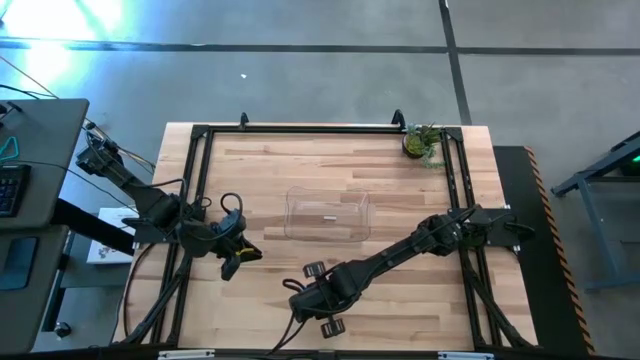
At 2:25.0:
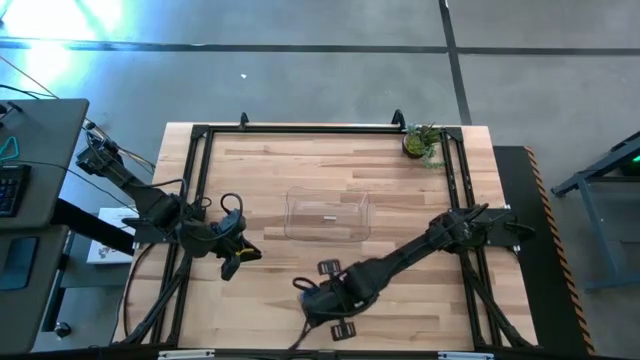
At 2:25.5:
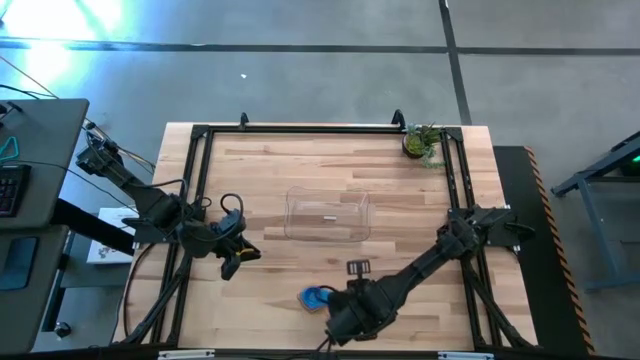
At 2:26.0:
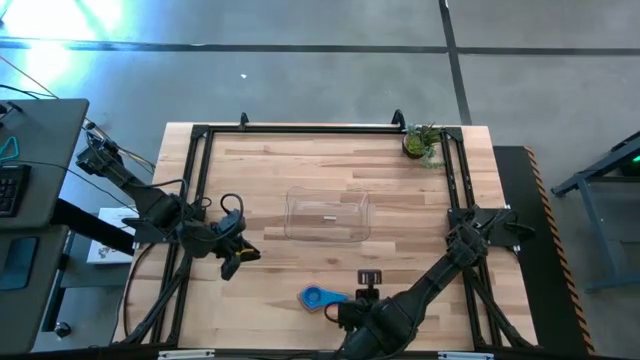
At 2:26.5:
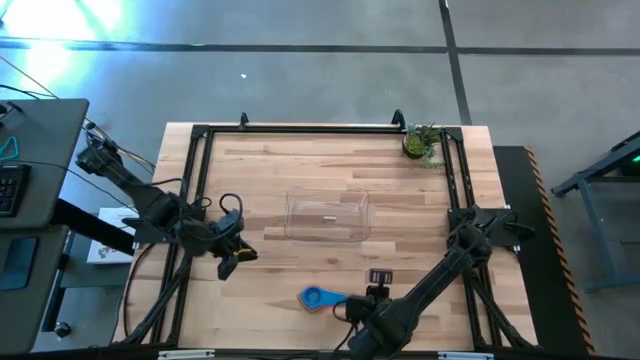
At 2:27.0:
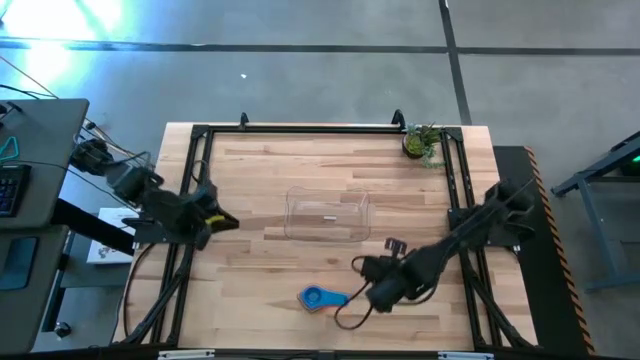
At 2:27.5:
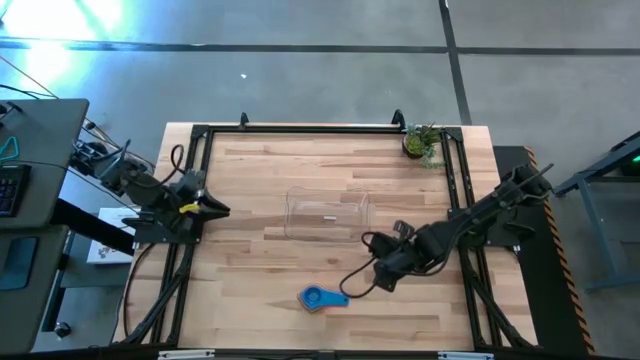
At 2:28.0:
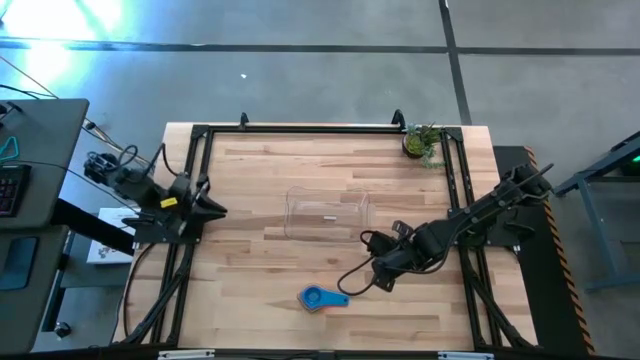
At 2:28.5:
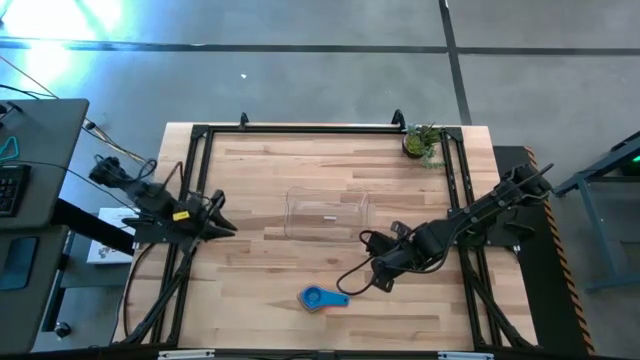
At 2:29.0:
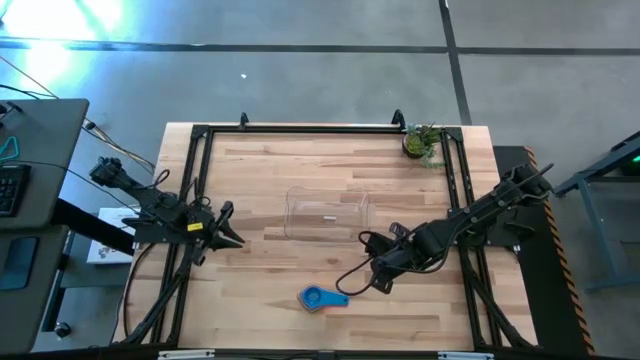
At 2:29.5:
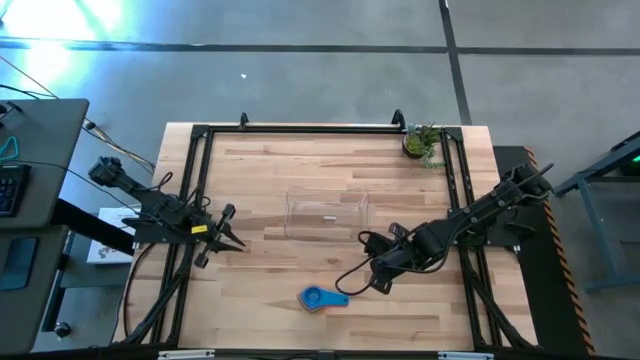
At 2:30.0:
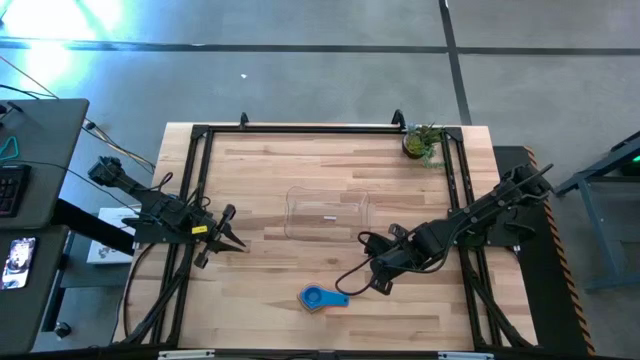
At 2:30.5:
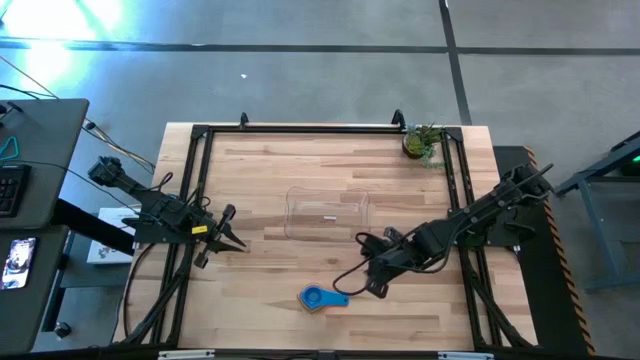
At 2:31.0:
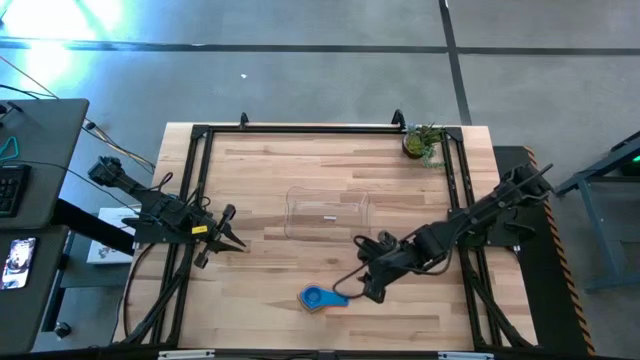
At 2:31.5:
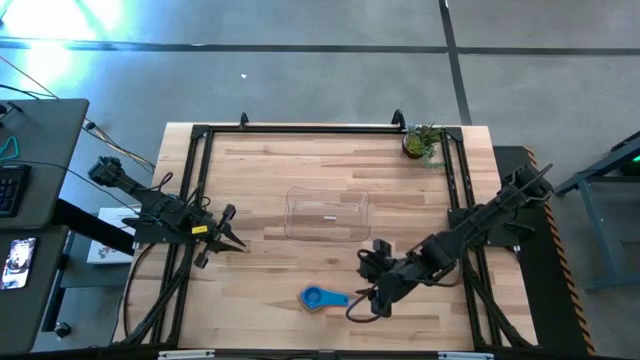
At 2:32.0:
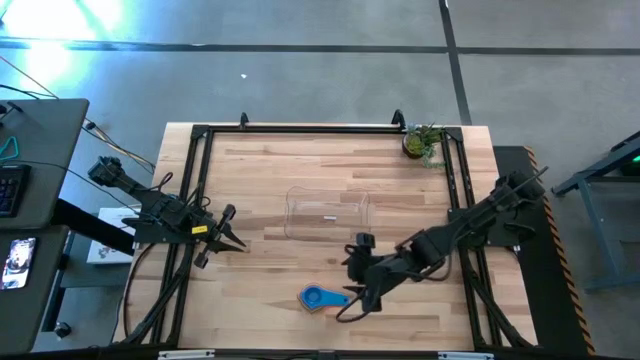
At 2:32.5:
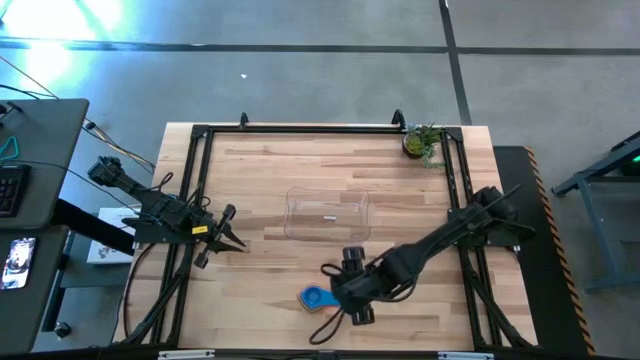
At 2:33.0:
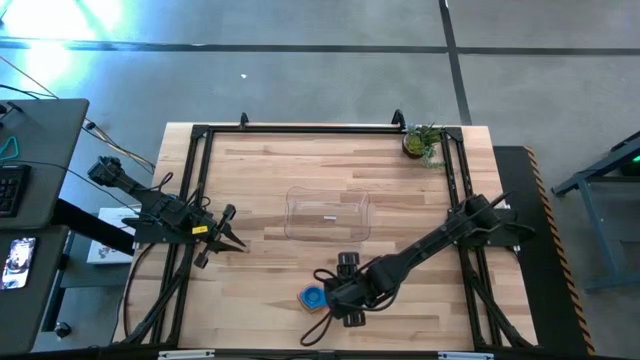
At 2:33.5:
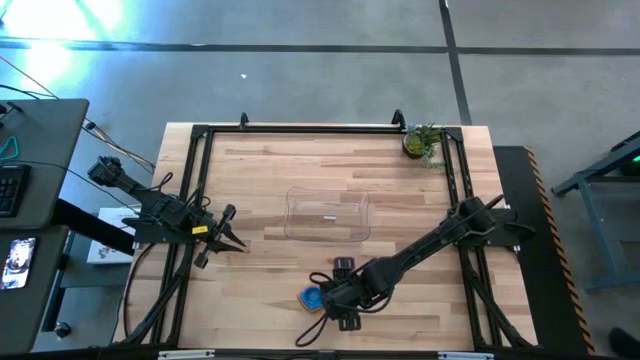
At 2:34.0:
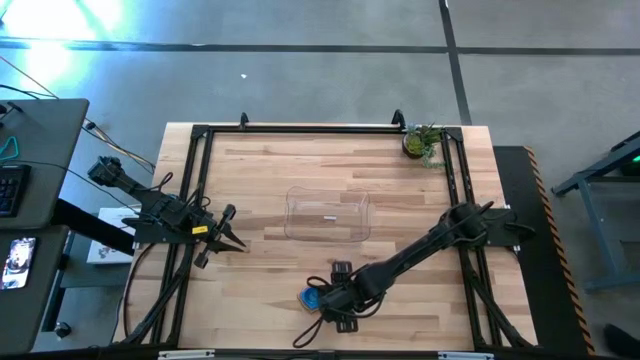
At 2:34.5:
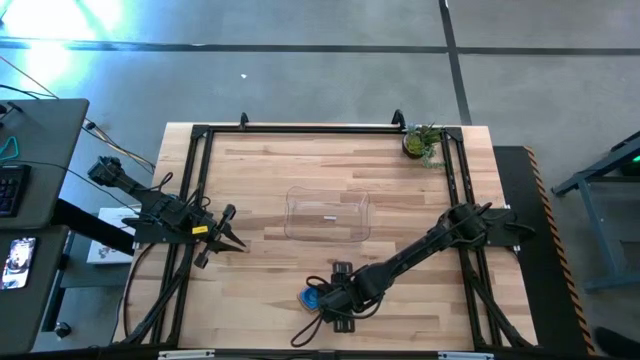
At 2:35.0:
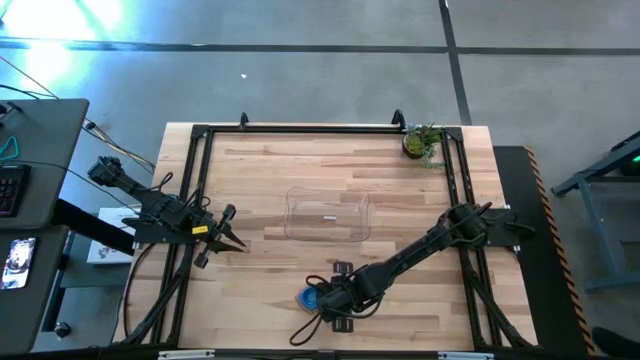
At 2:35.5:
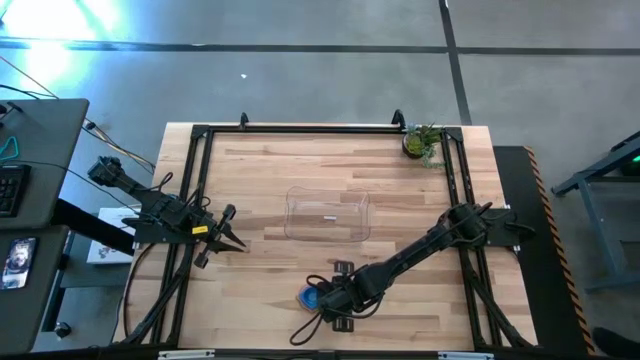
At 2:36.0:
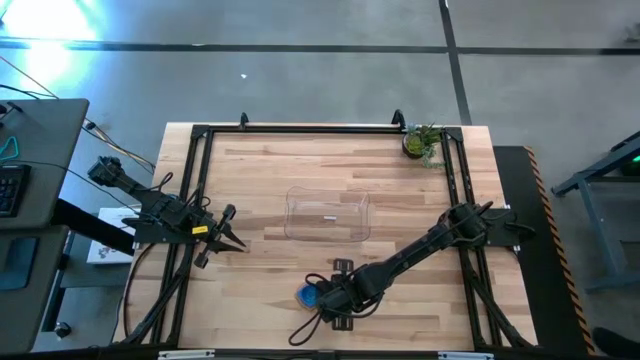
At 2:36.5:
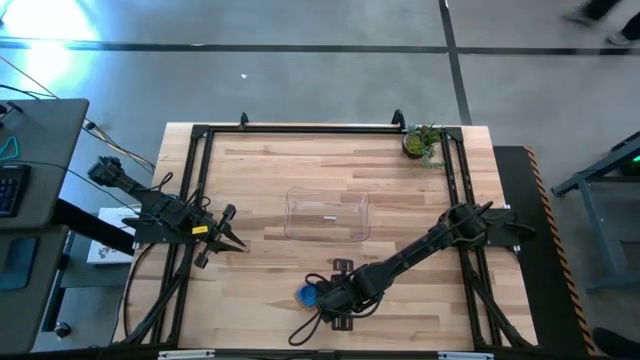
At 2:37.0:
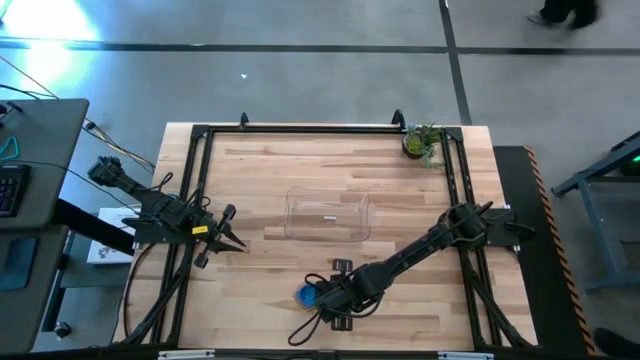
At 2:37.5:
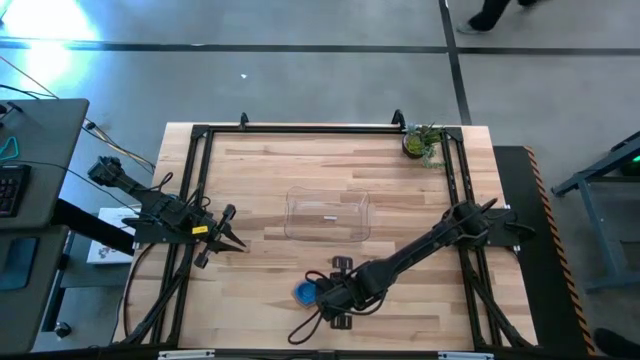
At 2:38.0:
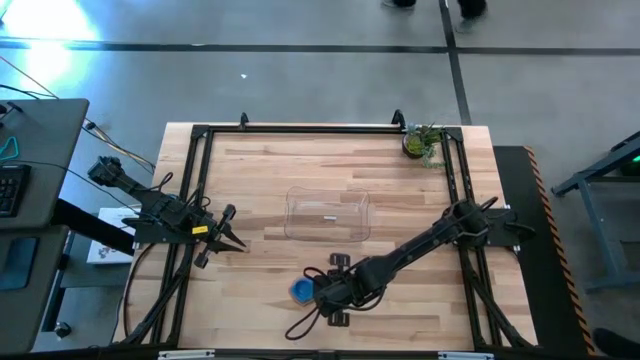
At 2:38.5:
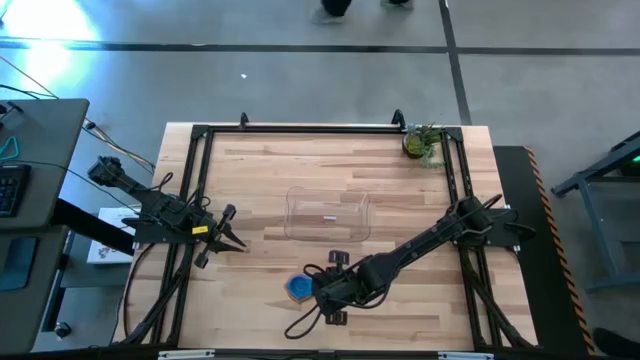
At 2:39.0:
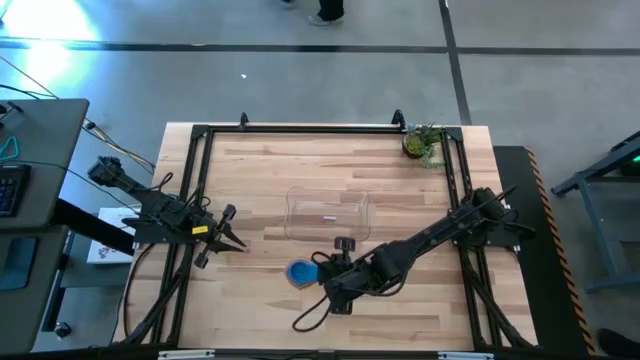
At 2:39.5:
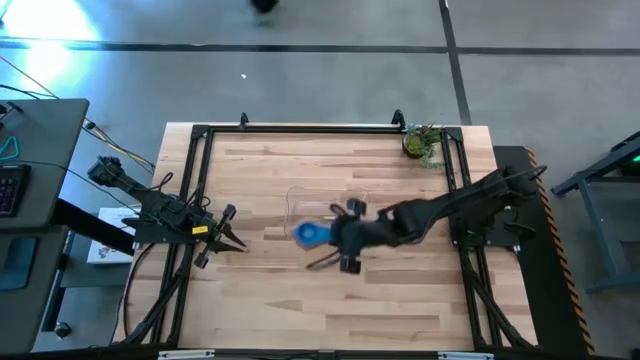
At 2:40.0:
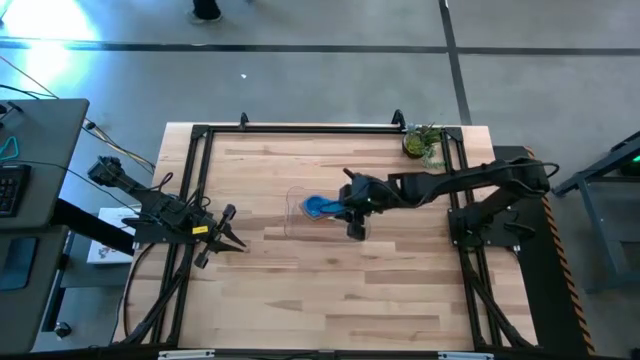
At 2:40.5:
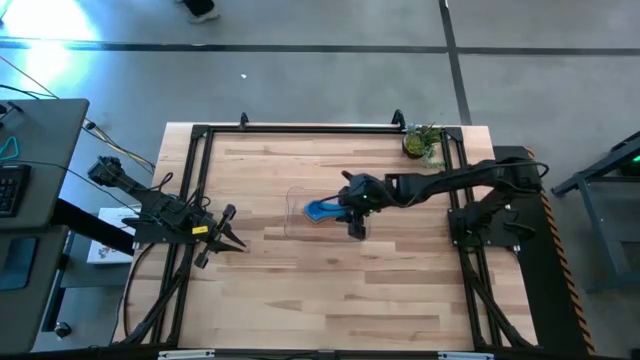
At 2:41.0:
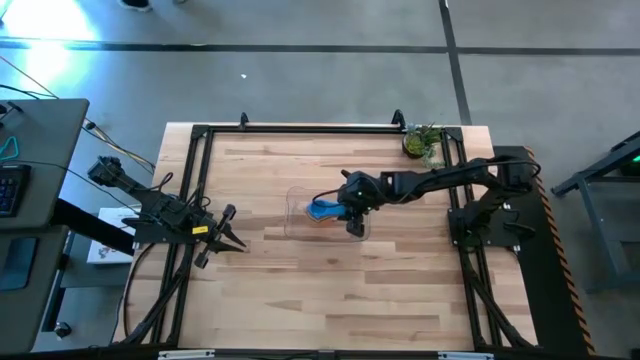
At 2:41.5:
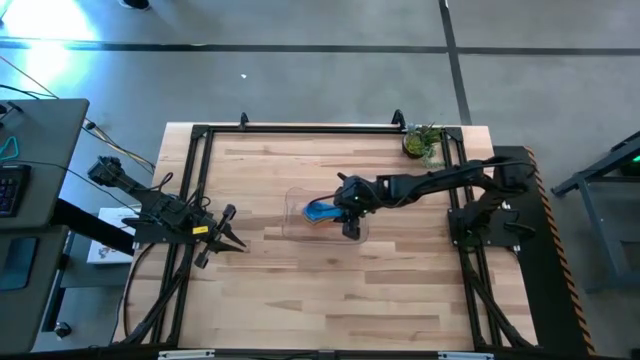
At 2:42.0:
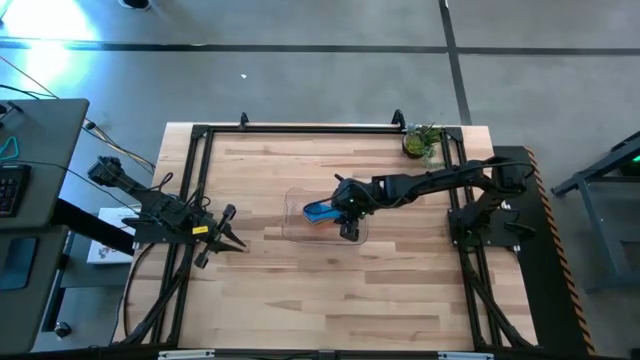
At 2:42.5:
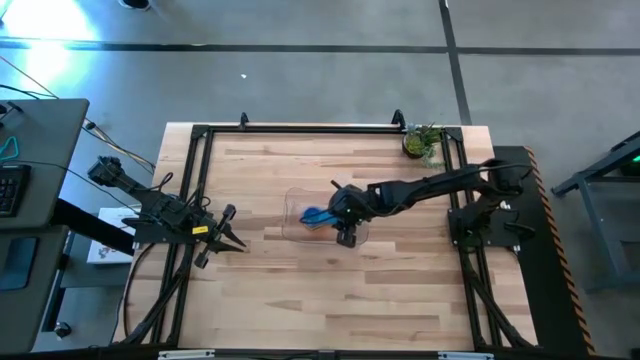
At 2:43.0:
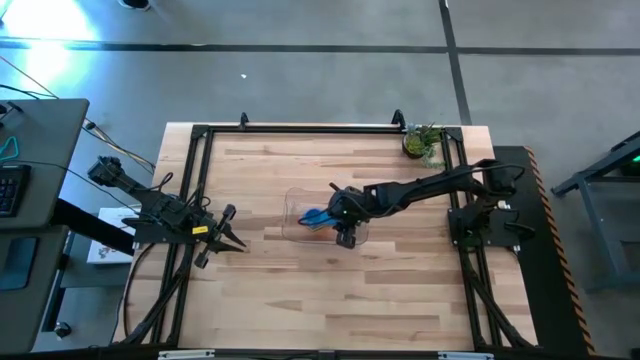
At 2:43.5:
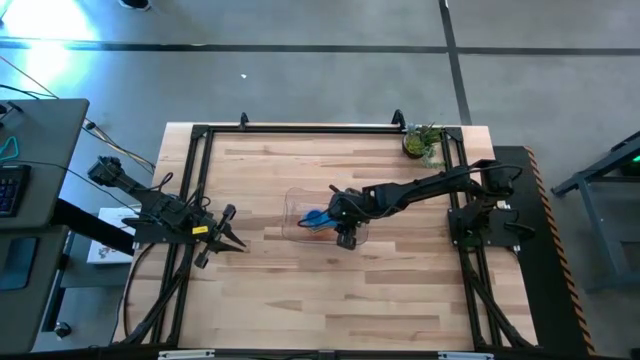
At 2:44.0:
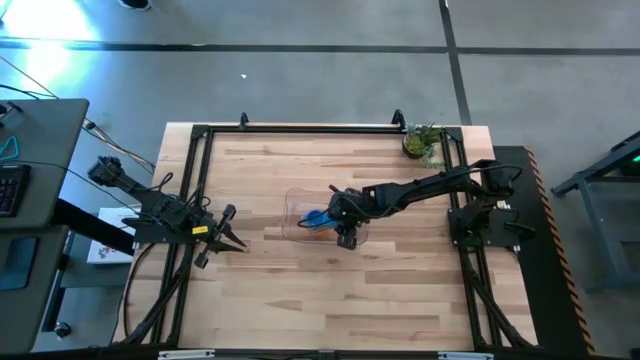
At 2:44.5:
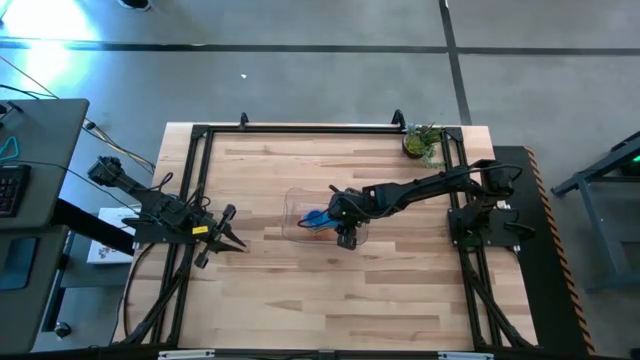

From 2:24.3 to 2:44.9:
Task: Nest measuring cups in basket
Put the stacked measuring cups on top of the transparent bin
